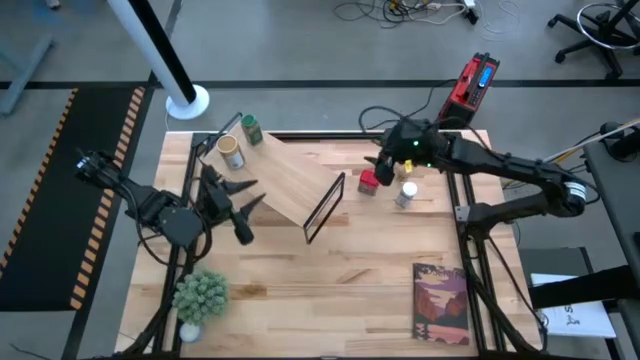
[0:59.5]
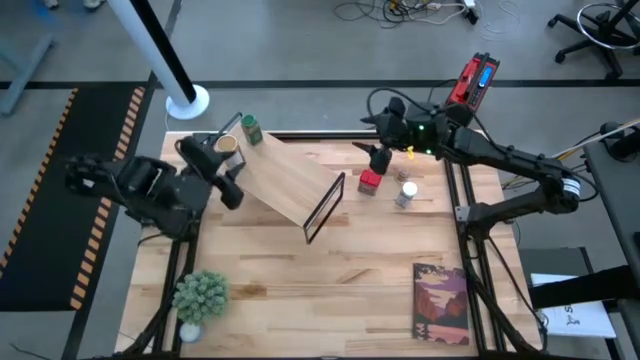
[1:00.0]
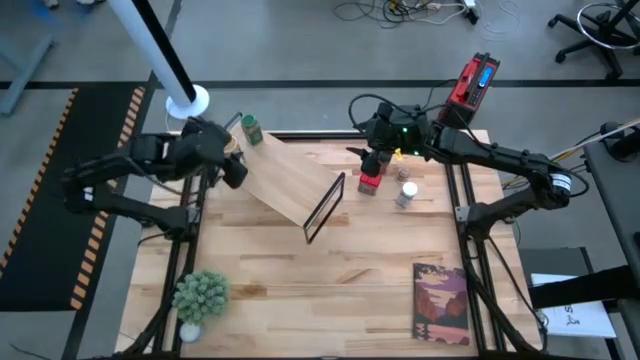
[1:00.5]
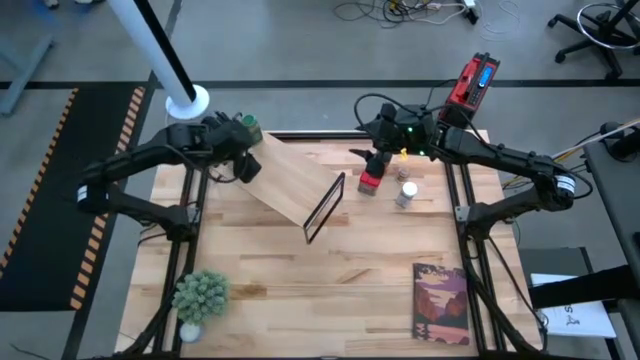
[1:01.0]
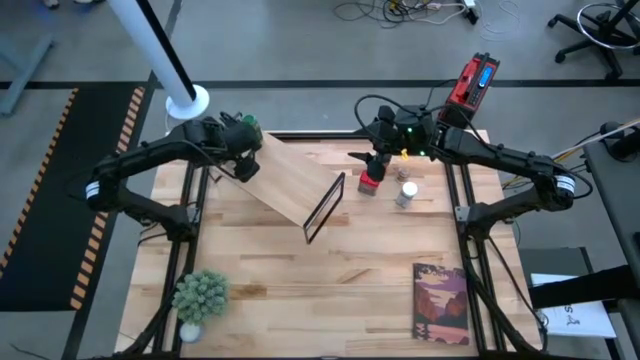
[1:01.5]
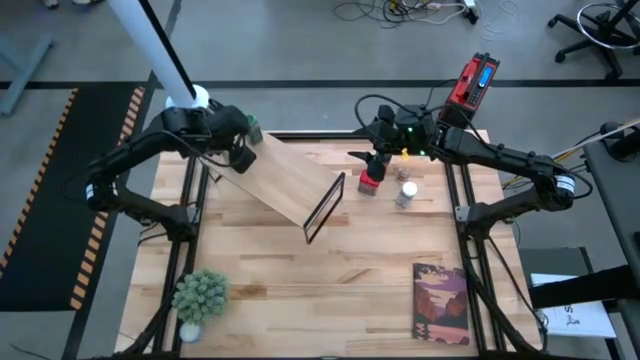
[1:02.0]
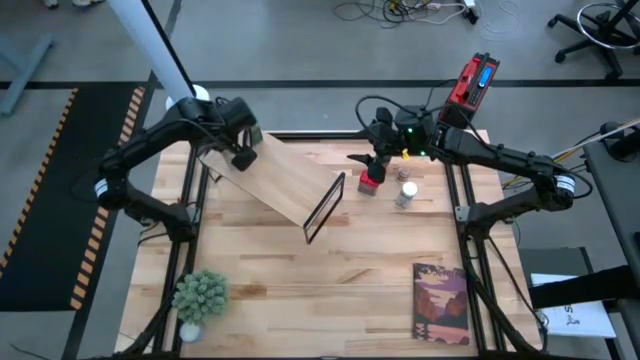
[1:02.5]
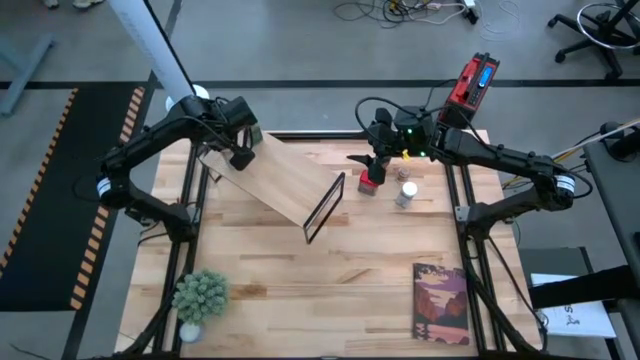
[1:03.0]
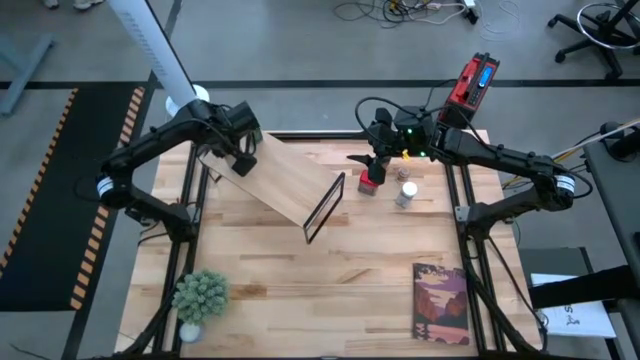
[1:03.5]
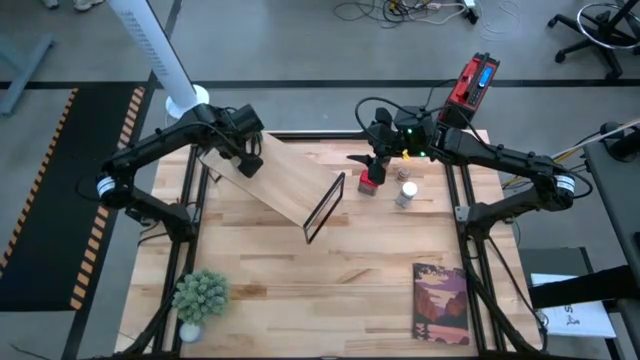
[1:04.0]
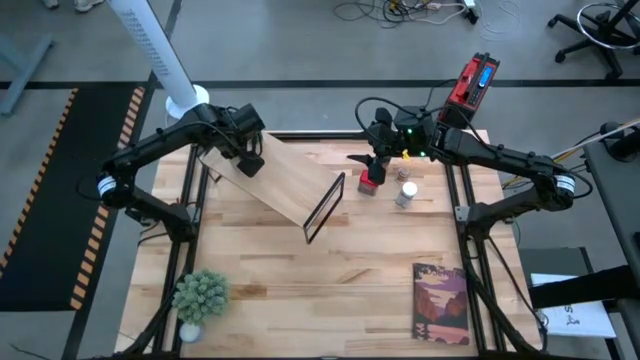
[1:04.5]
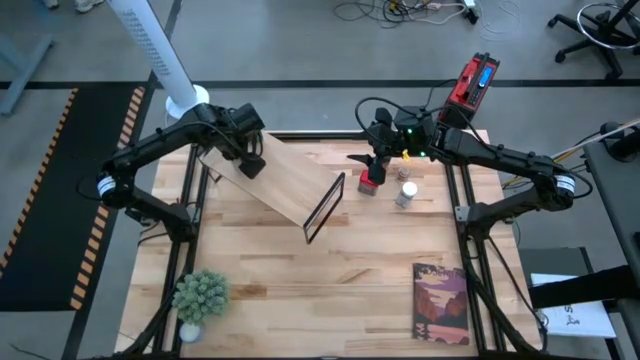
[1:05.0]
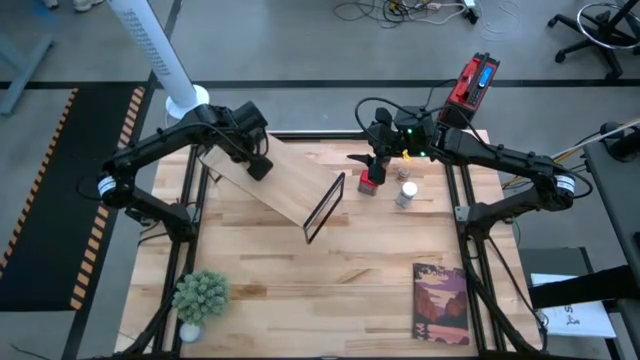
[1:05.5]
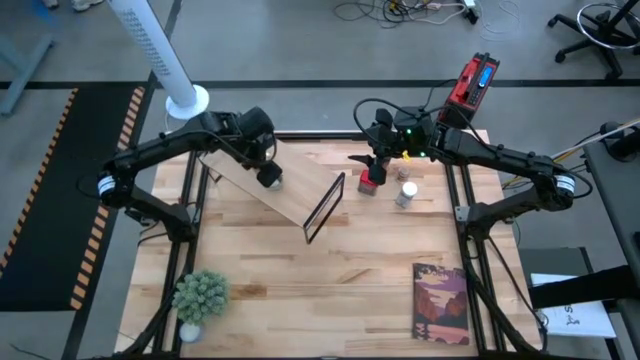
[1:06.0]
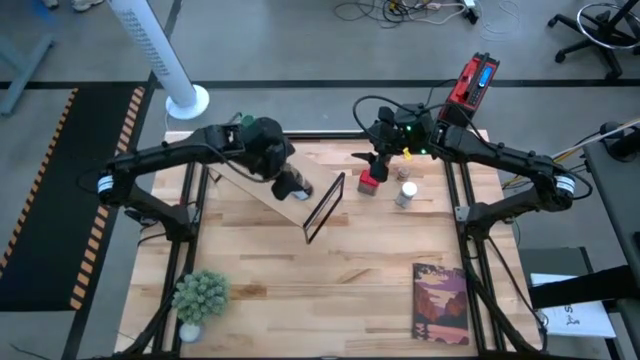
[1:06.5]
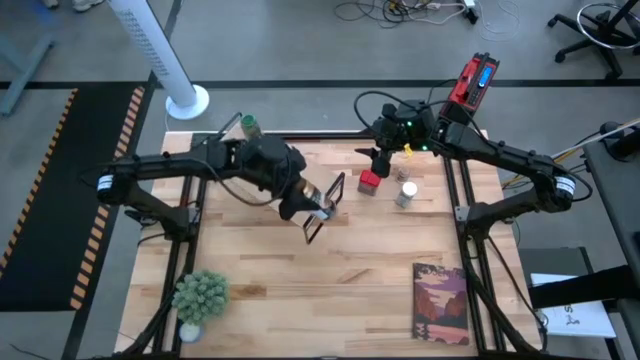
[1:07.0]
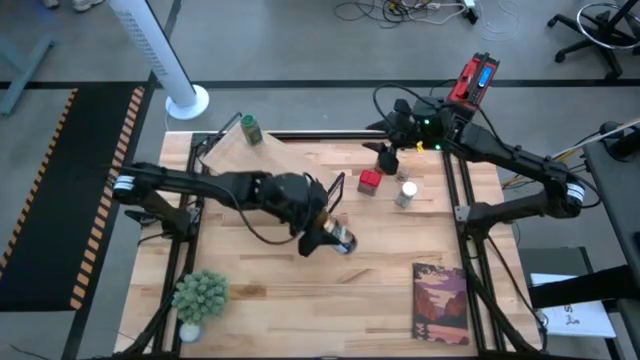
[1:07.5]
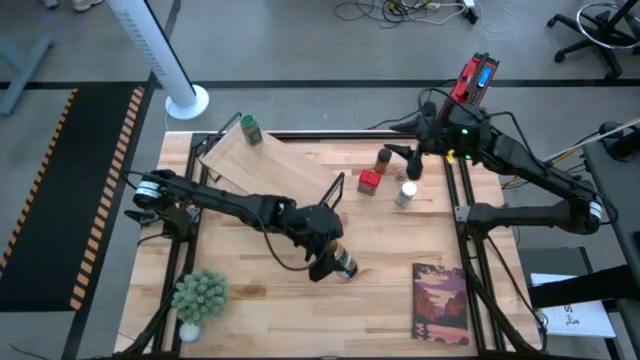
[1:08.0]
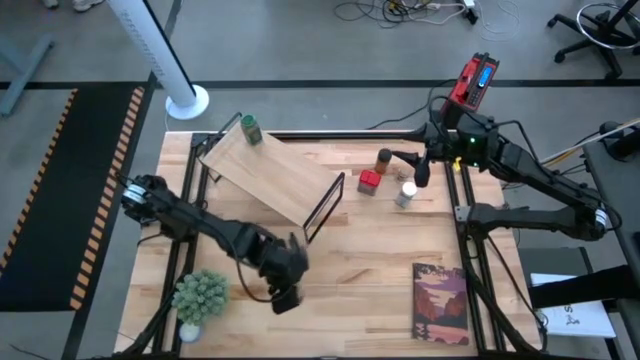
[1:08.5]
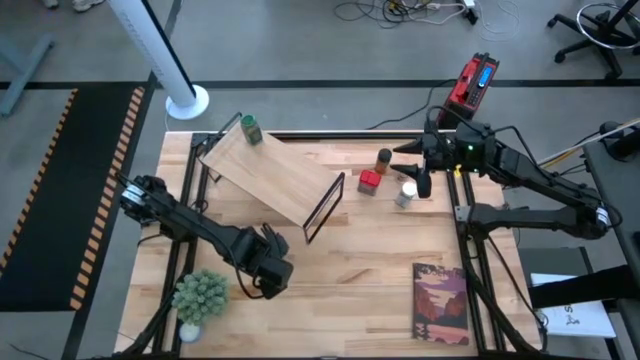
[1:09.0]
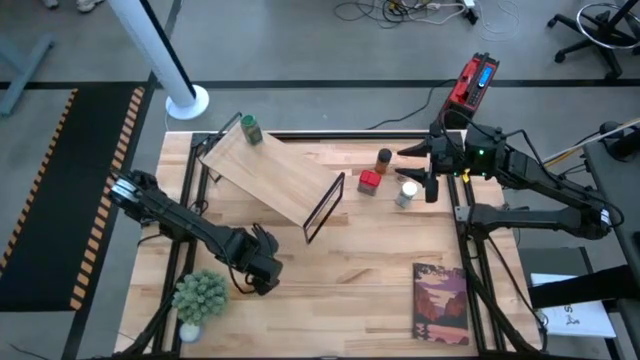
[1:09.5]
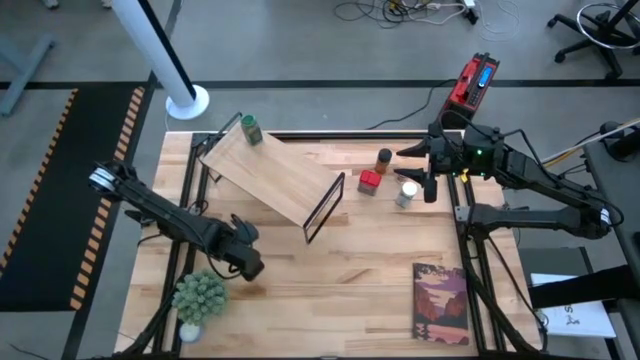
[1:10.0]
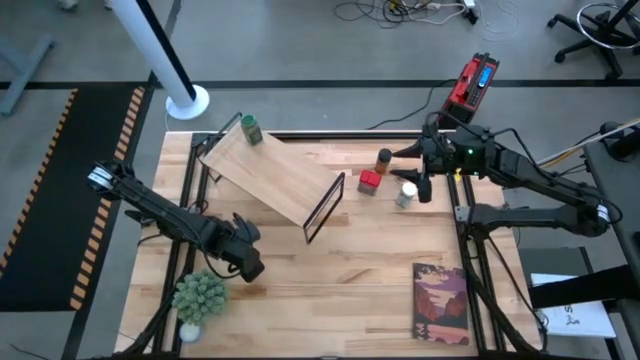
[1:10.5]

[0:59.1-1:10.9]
Task: Shelf spices
Remove the gold seasoning bottle from the shelf

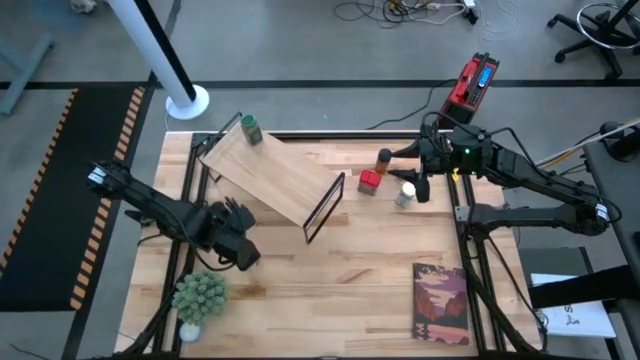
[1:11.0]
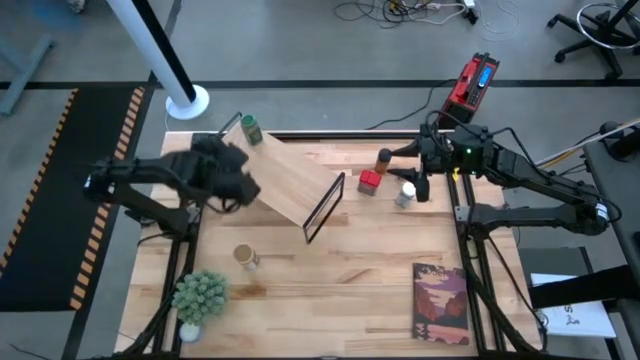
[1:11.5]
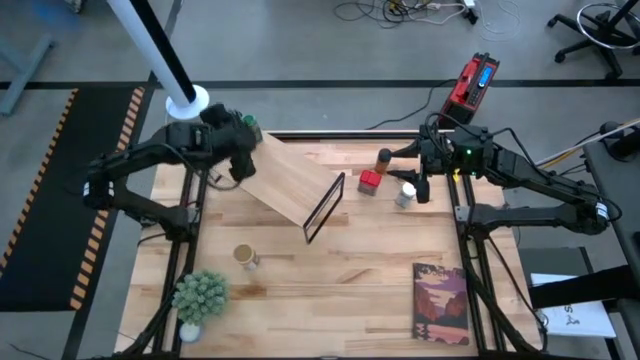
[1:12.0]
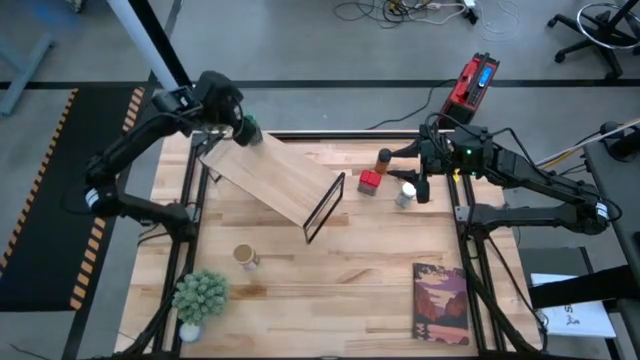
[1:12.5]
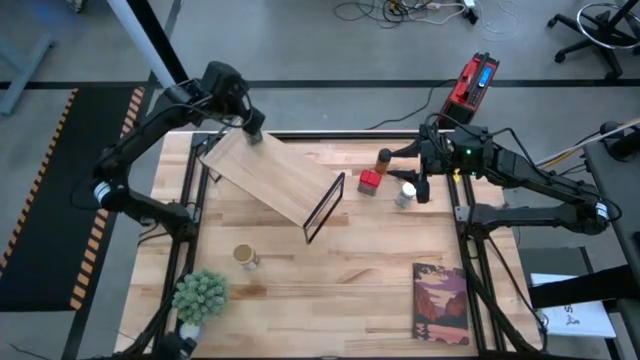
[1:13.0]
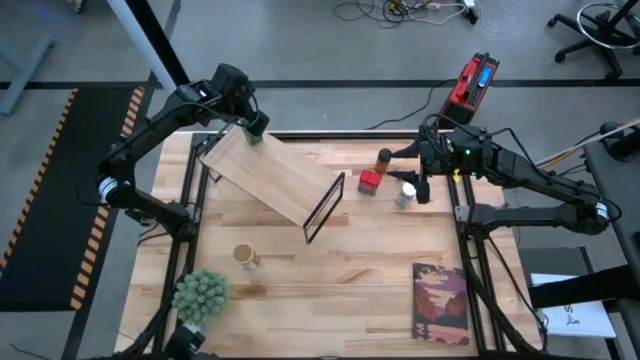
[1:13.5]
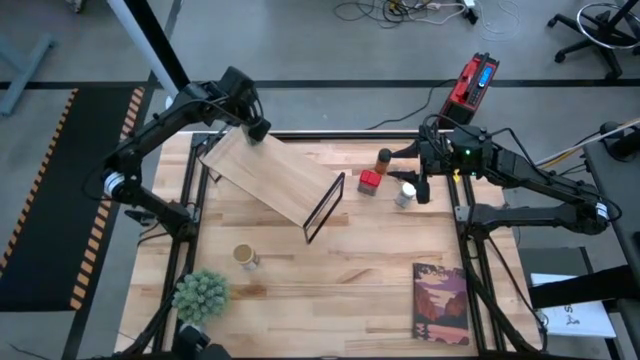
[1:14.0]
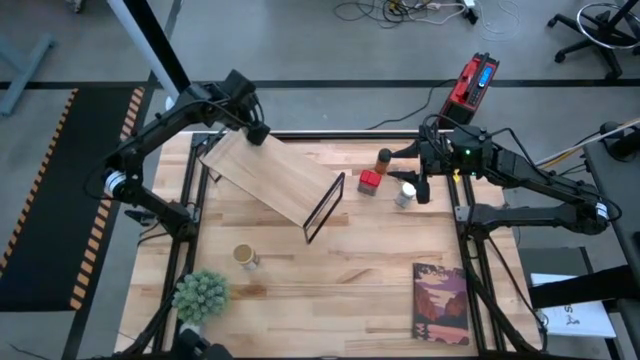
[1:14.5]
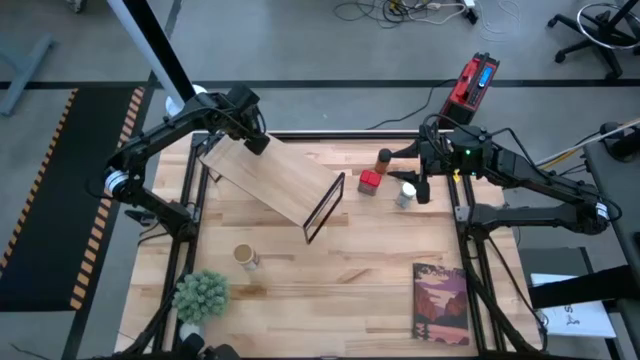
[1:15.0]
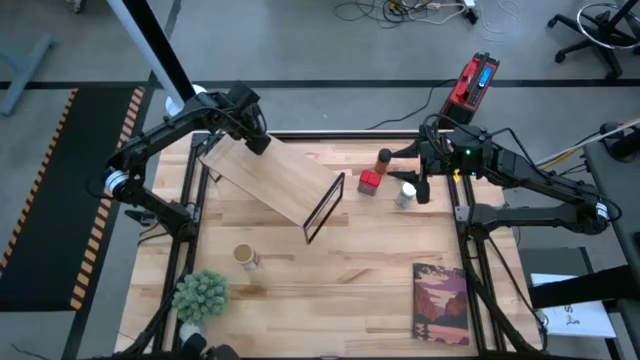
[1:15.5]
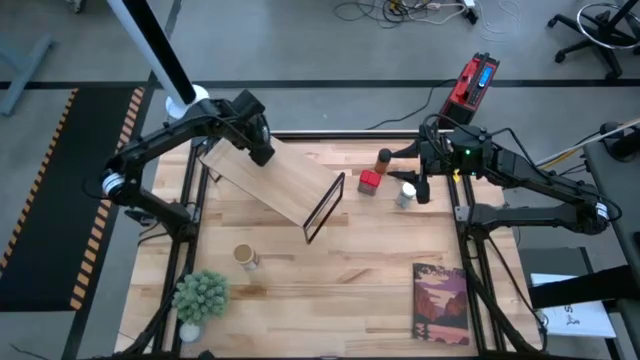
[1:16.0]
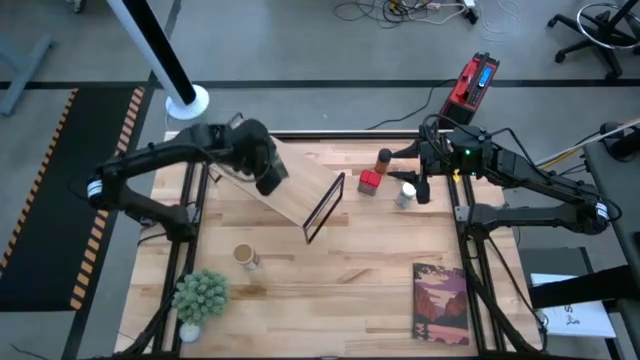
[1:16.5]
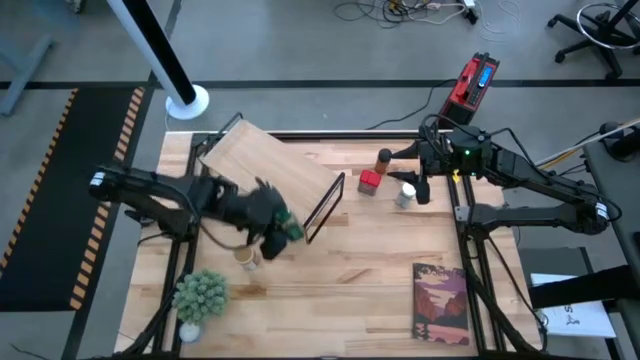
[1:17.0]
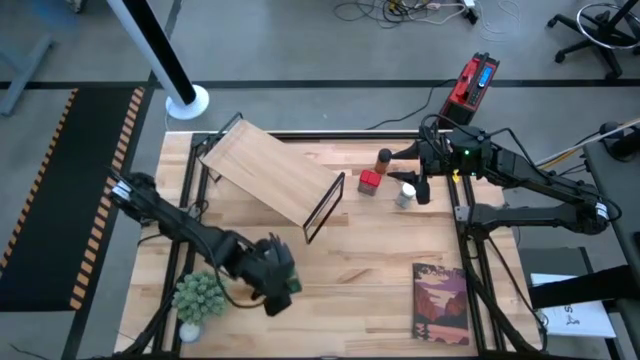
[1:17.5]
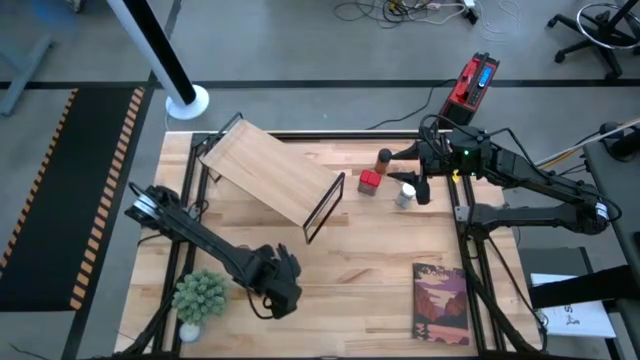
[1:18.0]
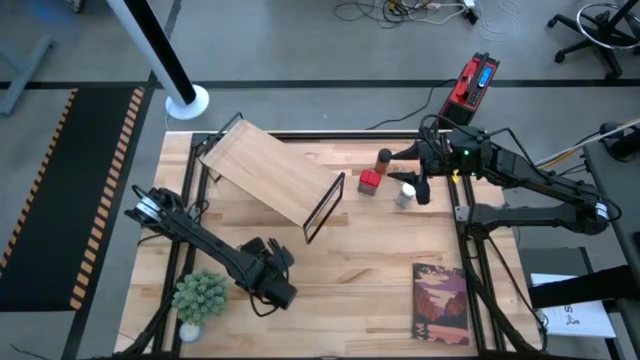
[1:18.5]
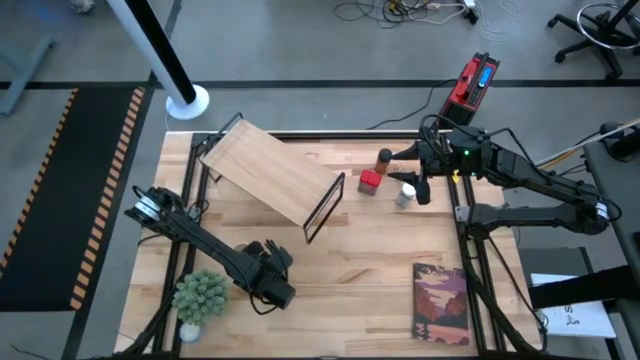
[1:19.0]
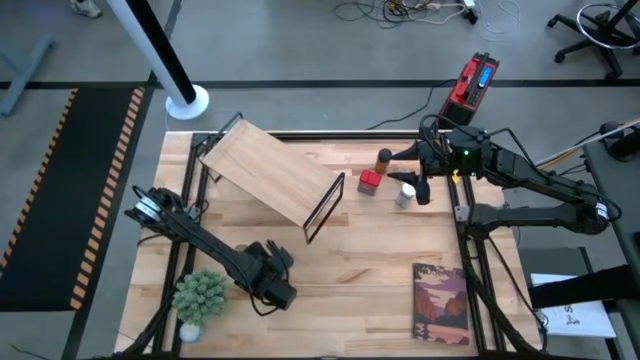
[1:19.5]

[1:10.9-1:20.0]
Remove the green seasoning bottle from the shelf

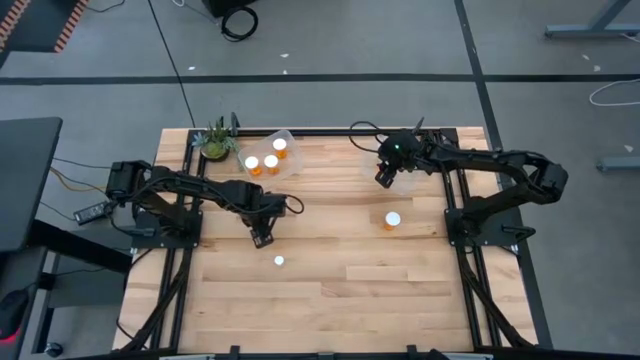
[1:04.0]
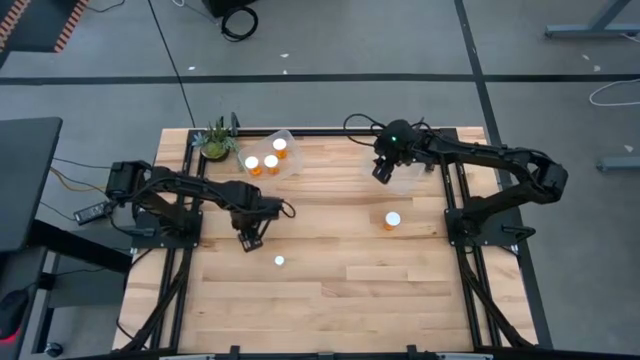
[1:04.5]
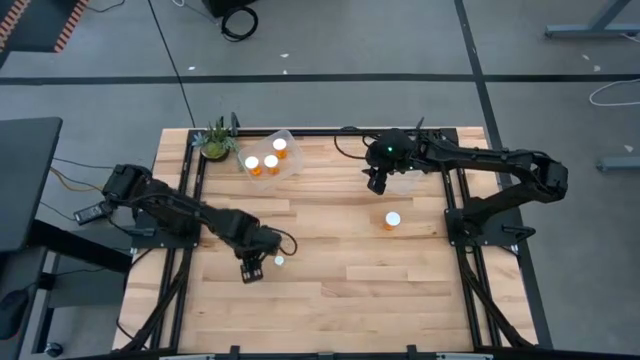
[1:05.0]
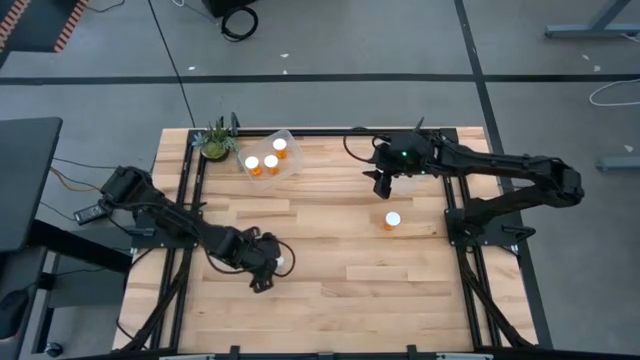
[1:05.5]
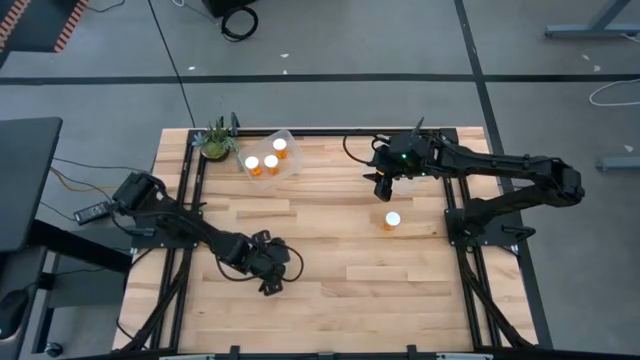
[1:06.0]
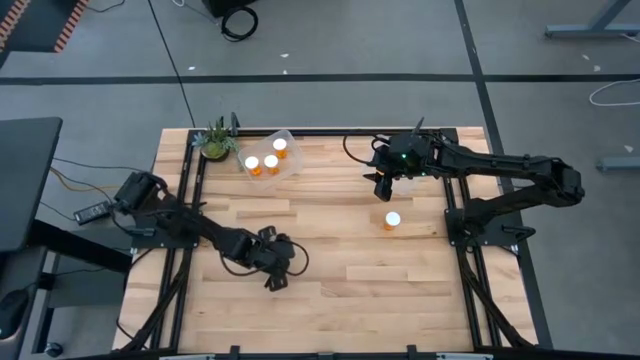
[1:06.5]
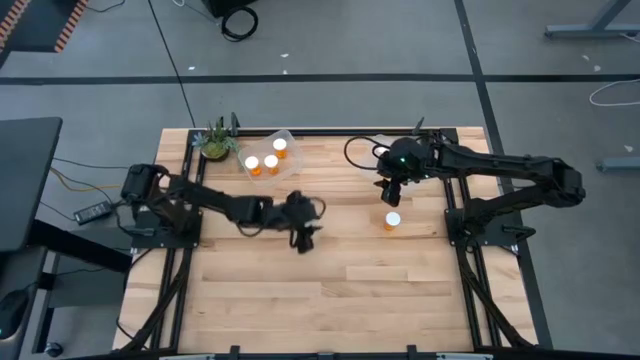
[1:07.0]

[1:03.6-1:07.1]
Task: Pick and place medicine bottles into bin by pill shape (circle, oval)
Put the yellow tablet bottle into the right transparent bin
